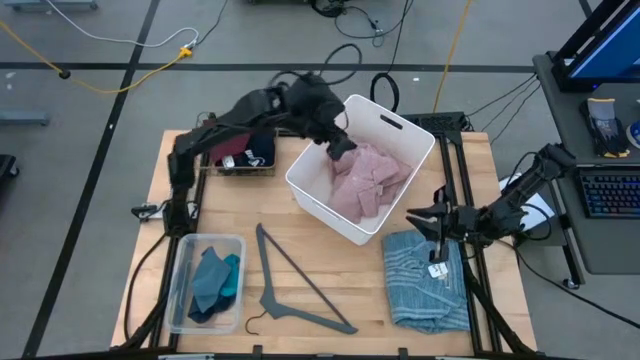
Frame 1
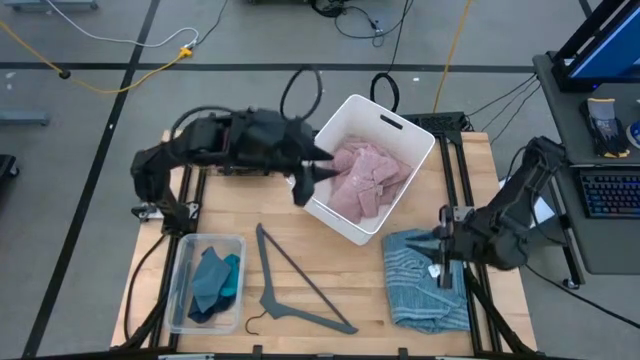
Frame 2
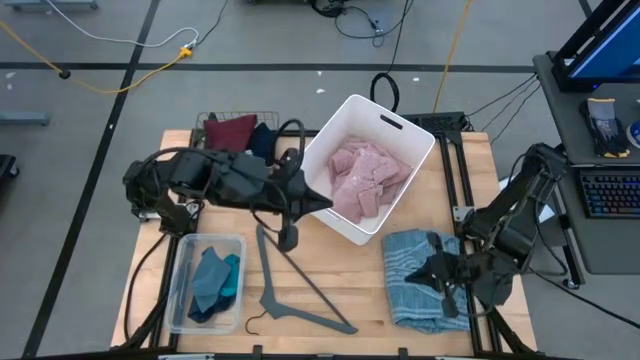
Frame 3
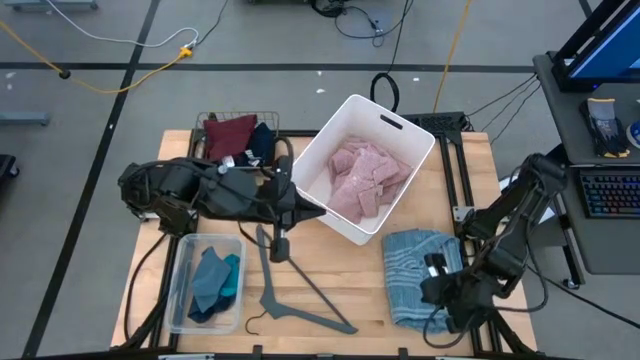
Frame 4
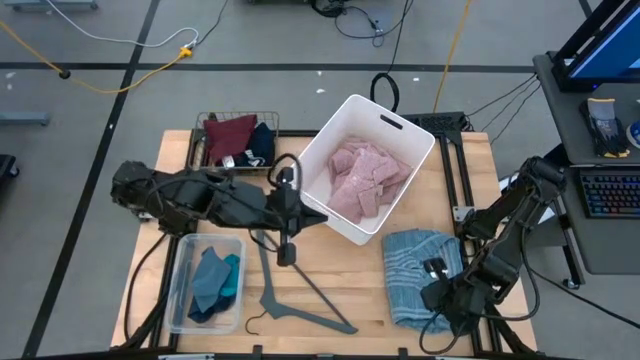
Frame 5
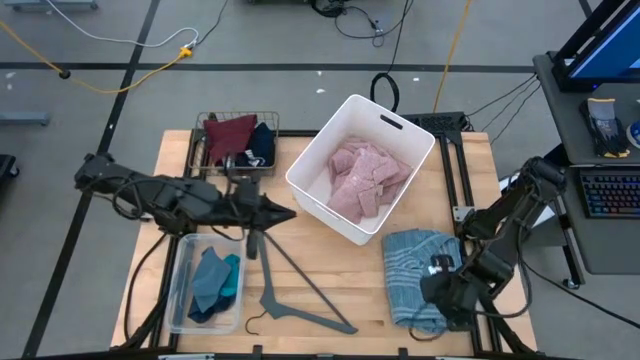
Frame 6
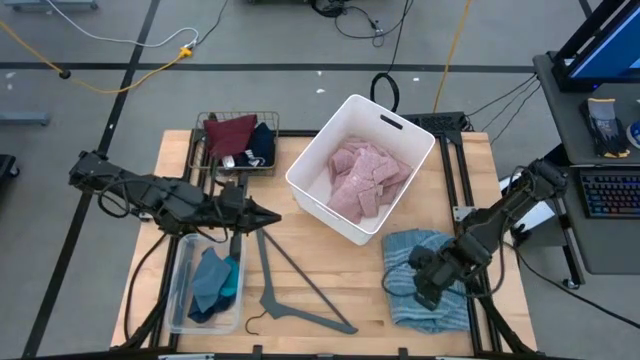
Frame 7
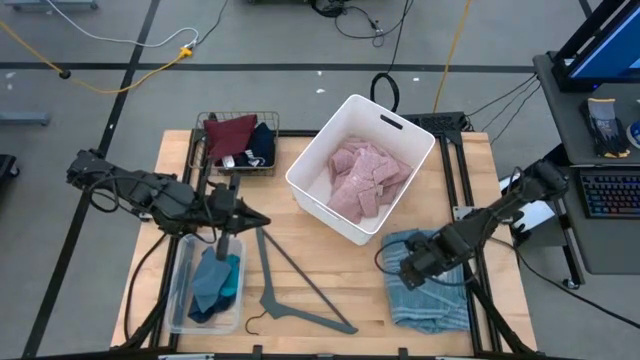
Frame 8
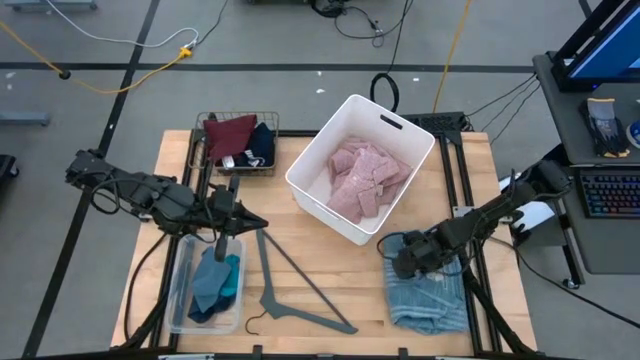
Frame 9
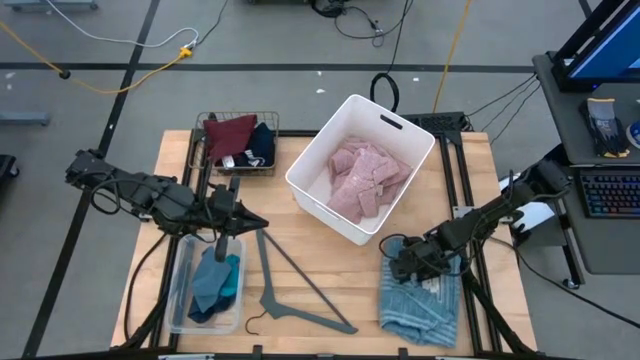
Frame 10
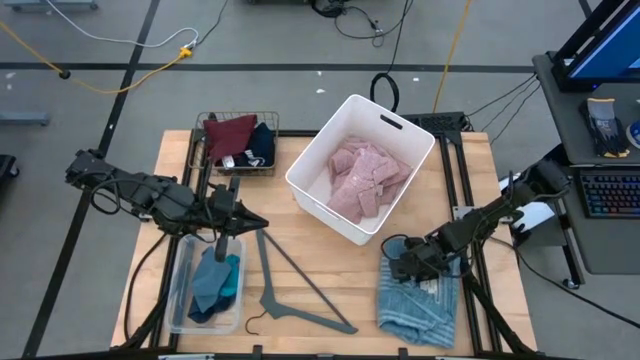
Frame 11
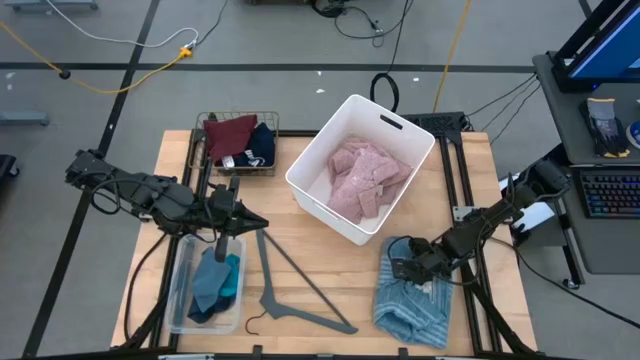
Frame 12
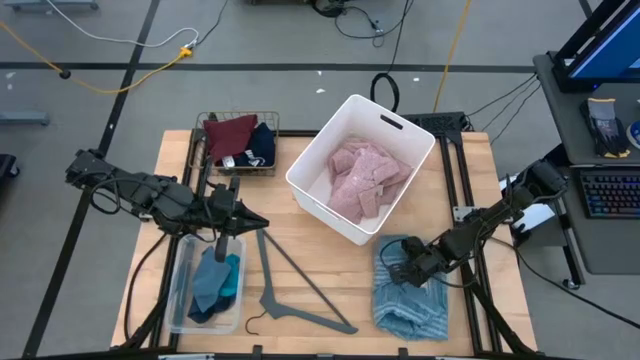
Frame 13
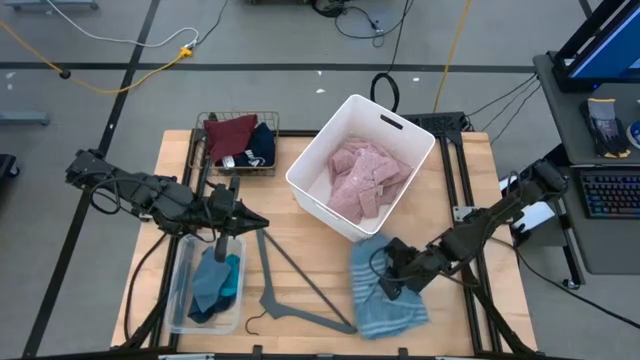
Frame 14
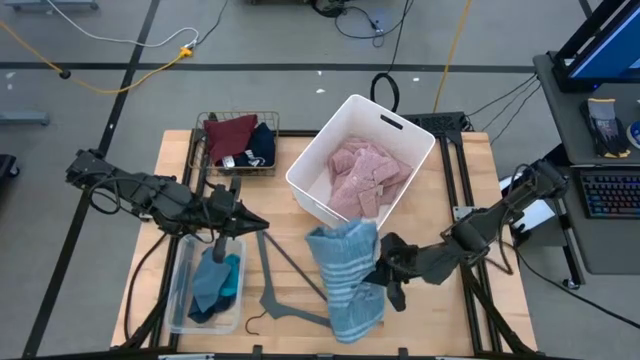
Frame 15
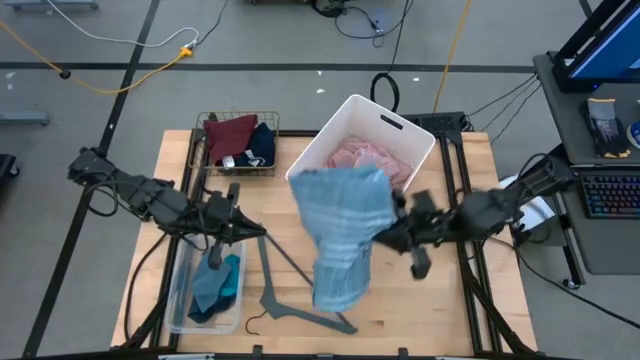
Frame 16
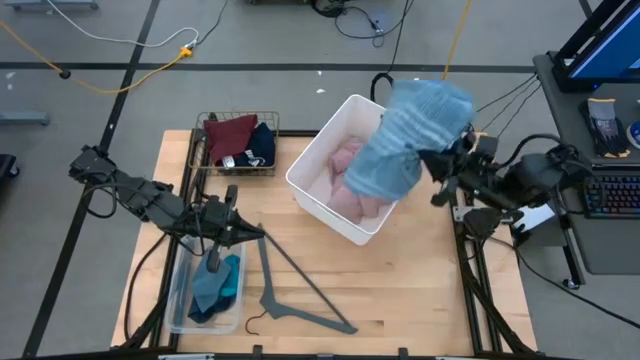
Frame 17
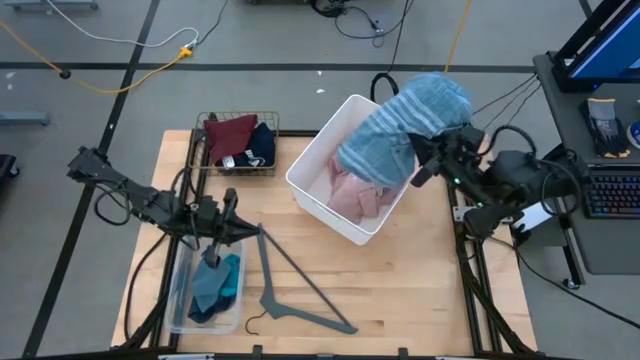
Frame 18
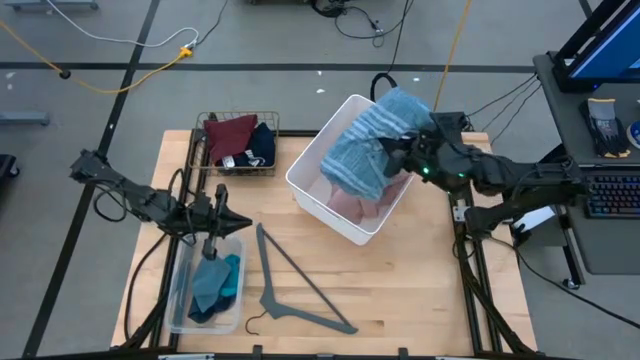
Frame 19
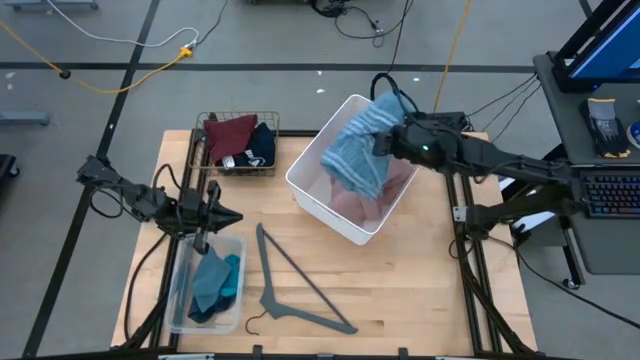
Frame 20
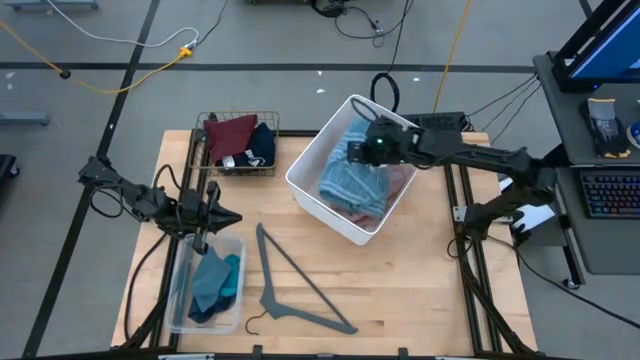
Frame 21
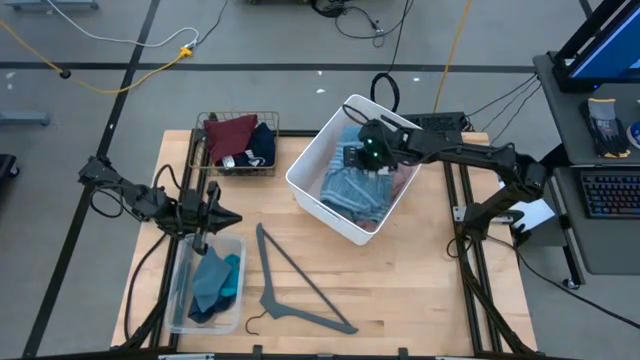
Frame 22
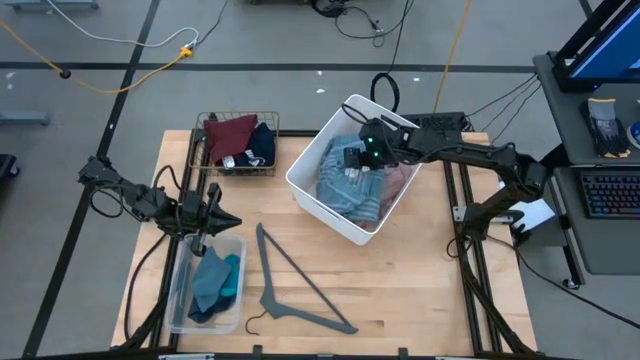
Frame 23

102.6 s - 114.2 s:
Task: Pick & Place Cloths
Put the blue polo shirt into the white bin

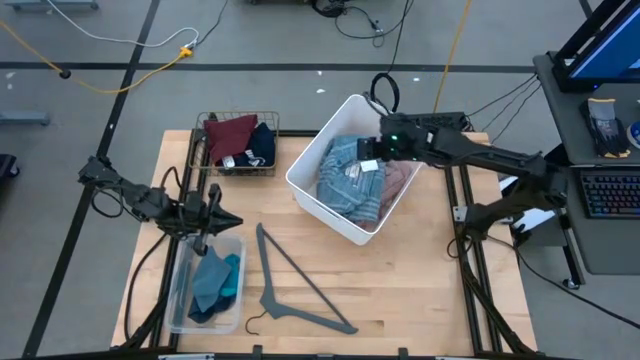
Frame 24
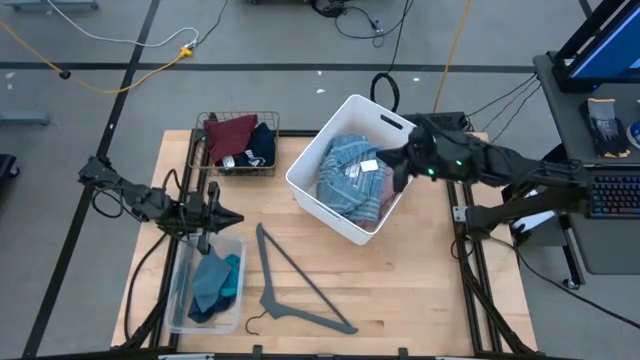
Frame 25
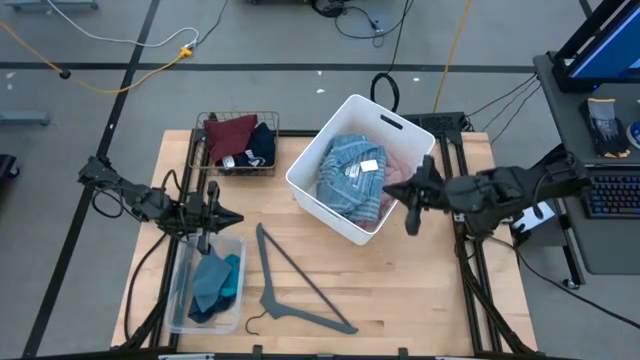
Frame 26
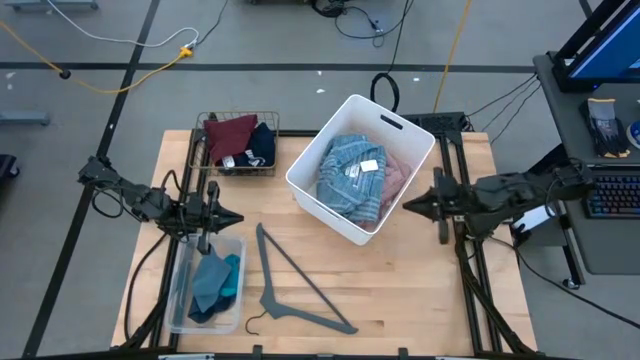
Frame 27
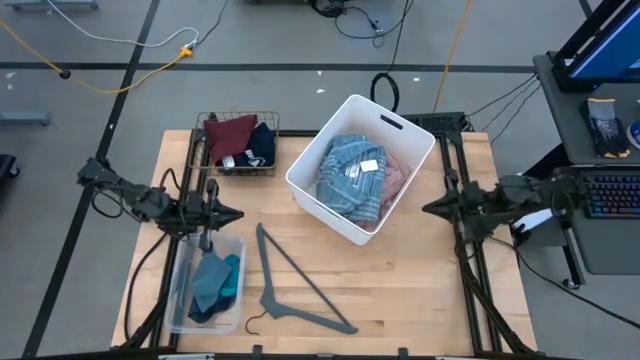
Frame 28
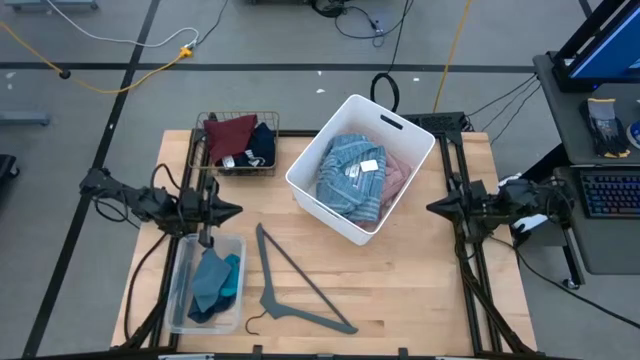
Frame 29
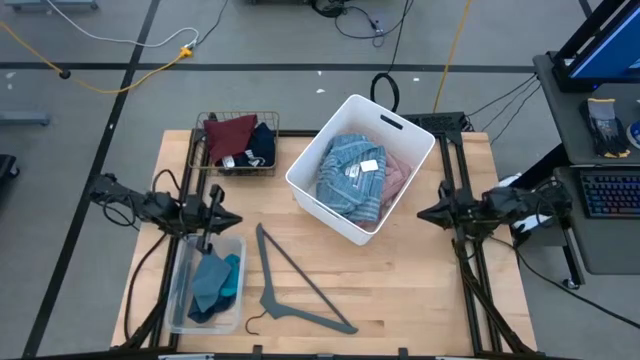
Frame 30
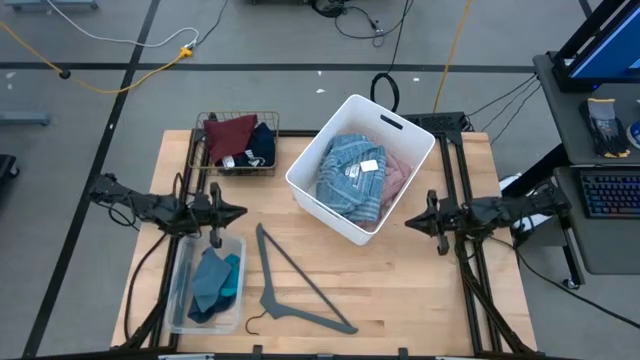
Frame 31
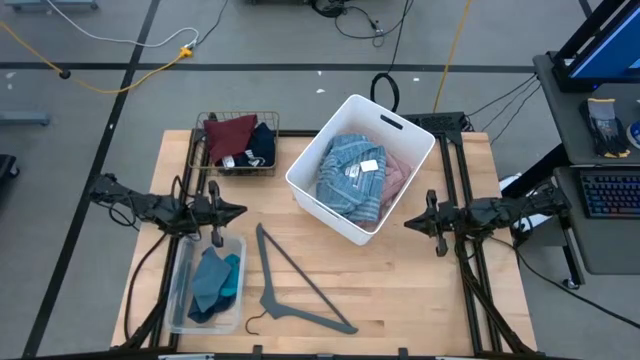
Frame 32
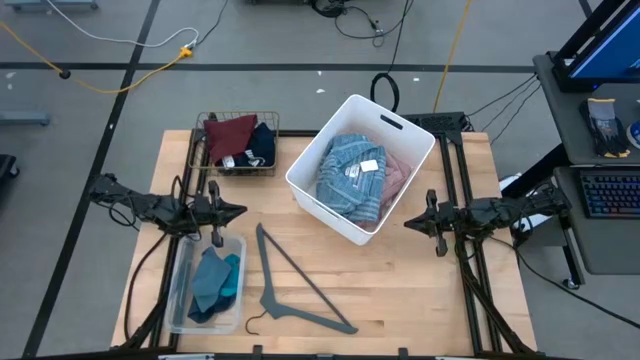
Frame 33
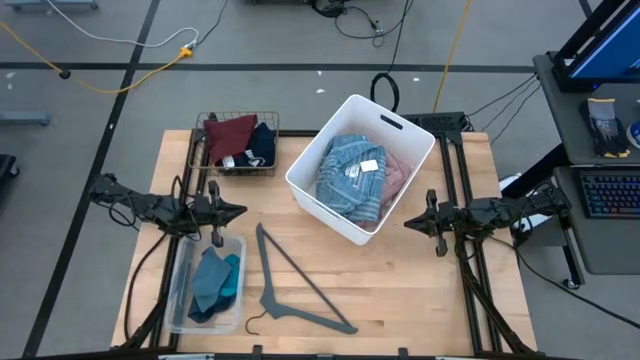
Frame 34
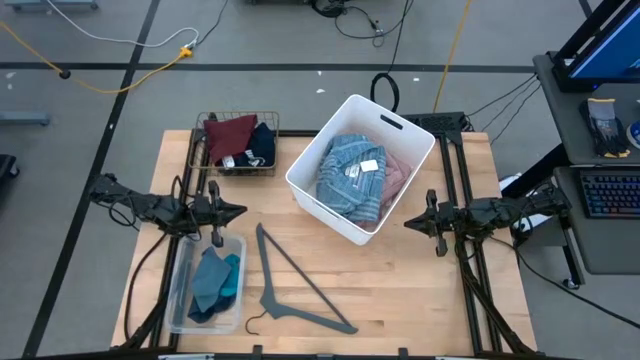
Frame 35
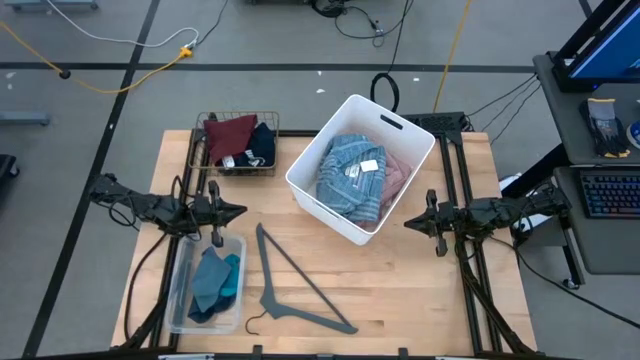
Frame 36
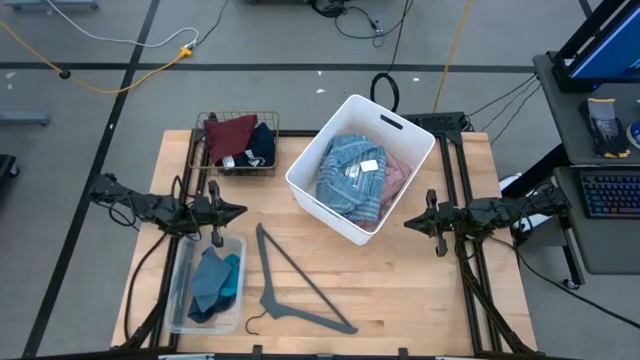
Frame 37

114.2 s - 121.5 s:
Return to home position

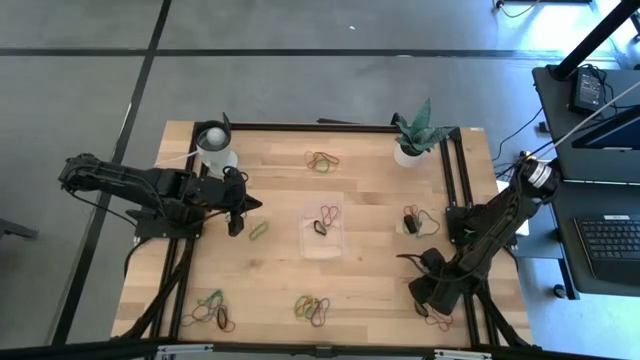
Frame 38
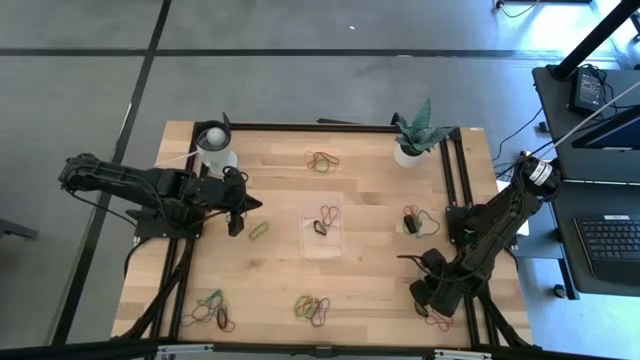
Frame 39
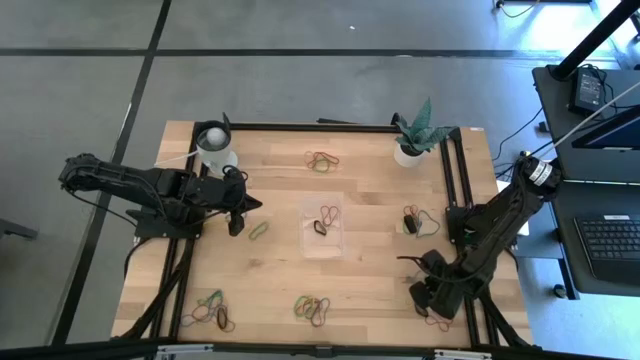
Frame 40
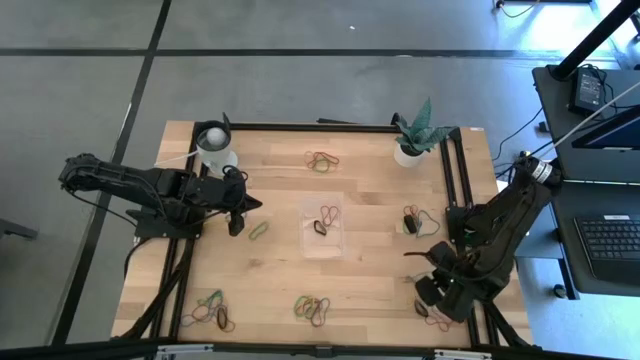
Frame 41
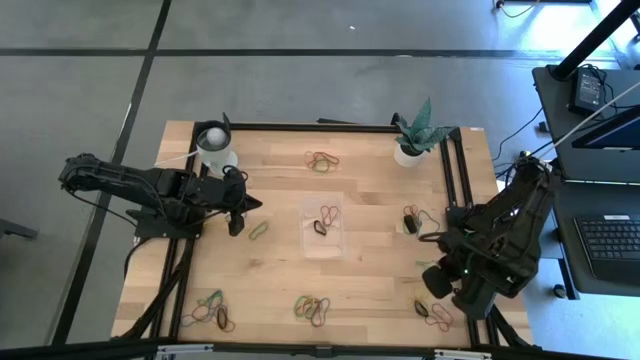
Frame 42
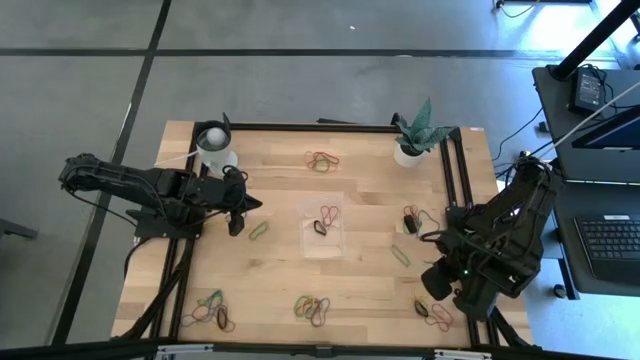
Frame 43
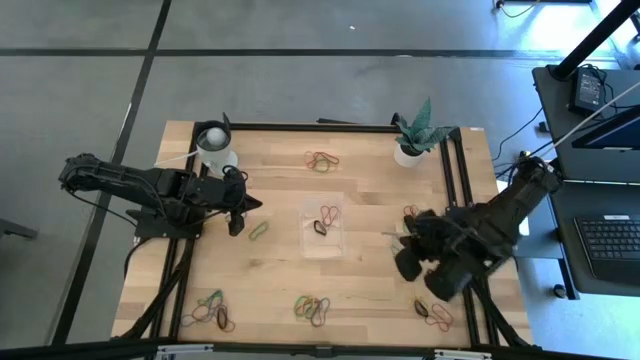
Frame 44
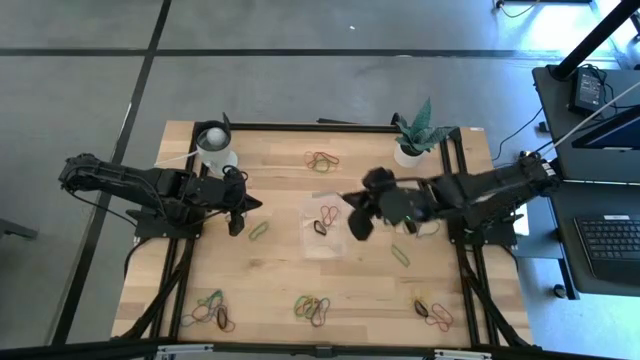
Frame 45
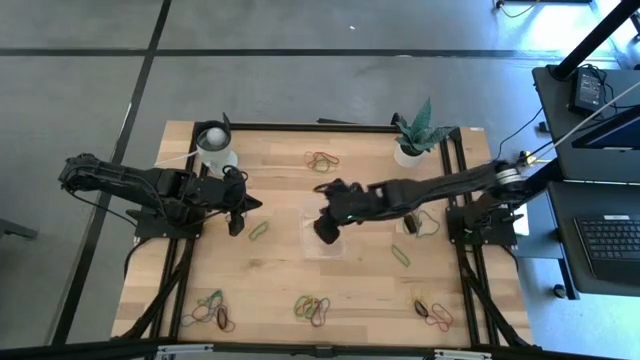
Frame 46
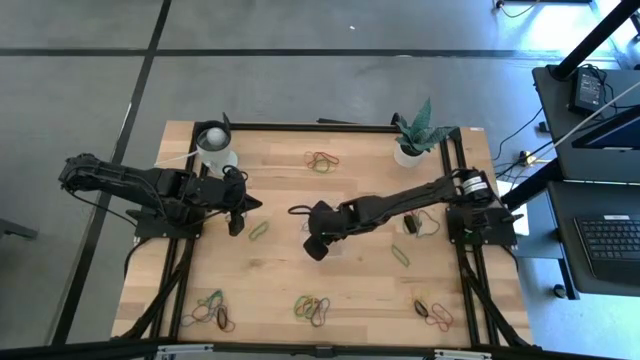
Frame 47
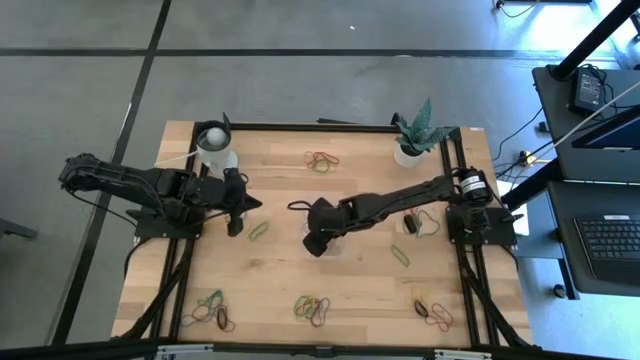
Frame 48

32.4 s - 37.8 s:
Task: Pick and place rubber bands into bin
Put the blue rubber band into the transparent bin
